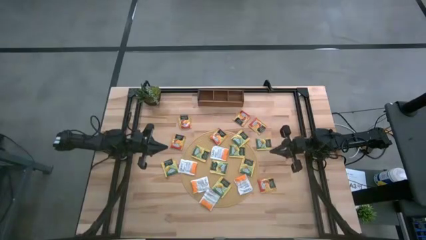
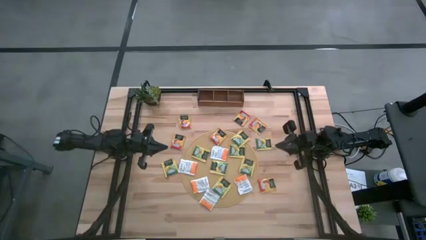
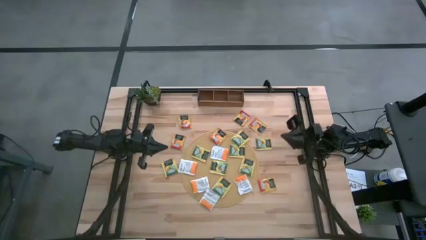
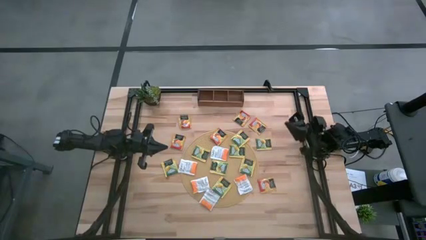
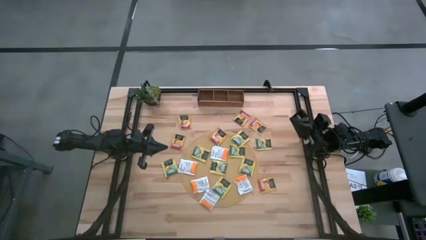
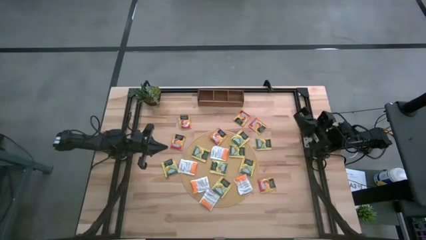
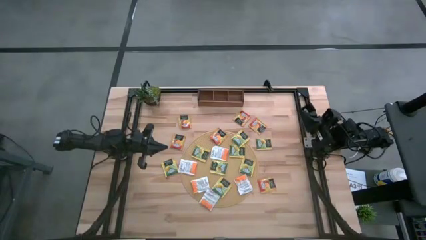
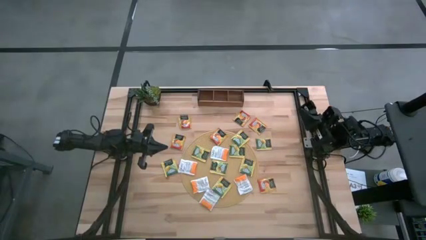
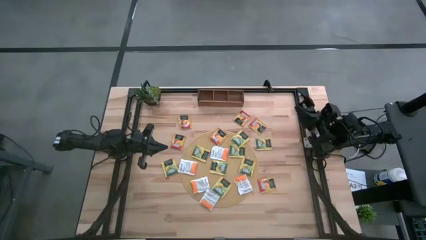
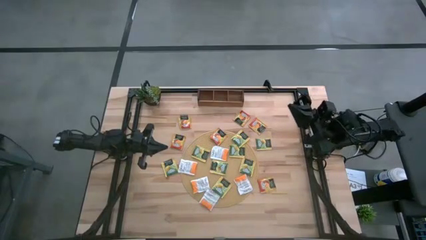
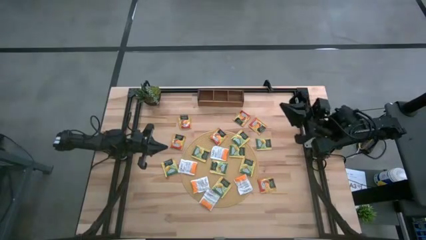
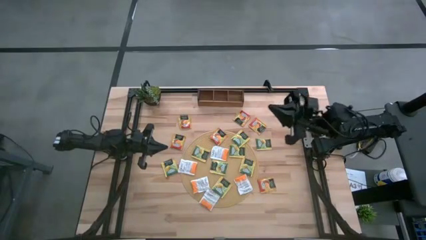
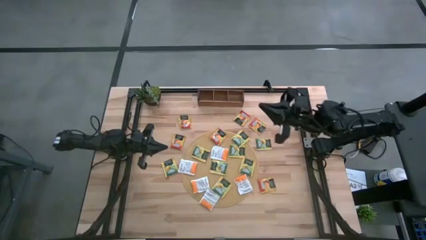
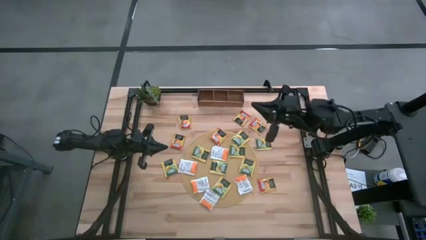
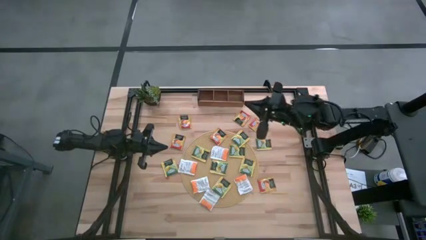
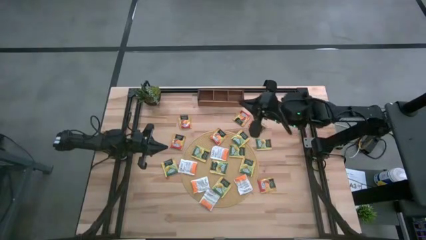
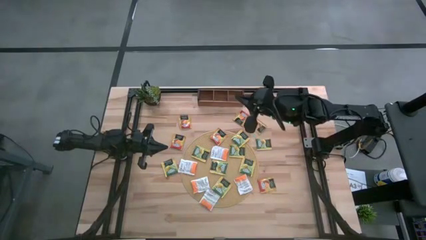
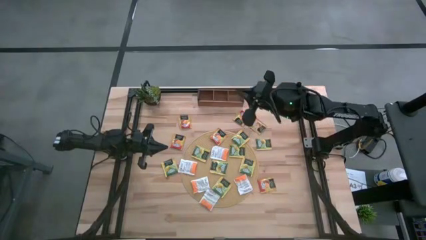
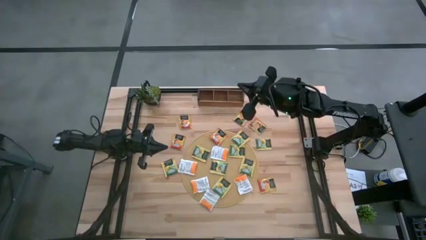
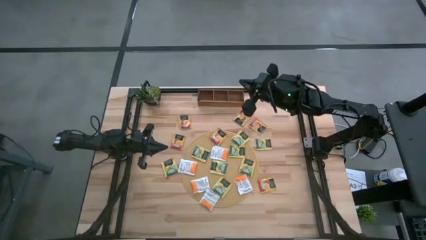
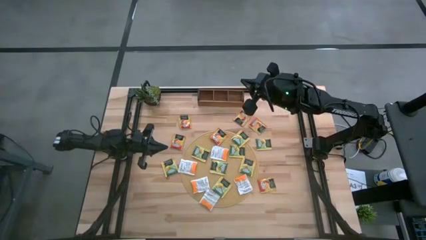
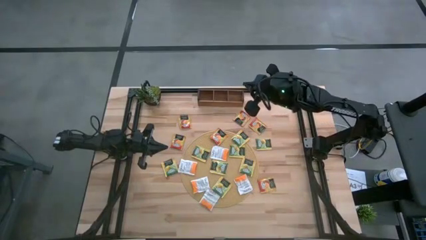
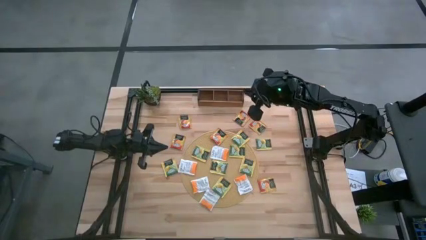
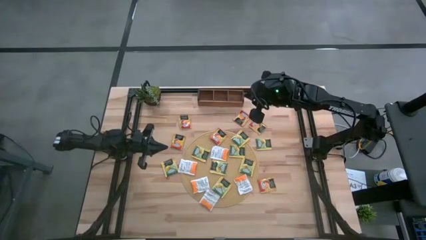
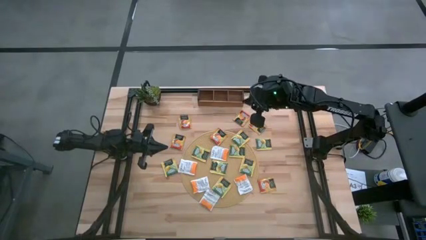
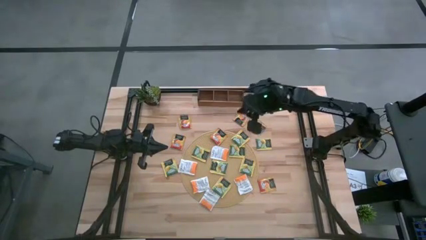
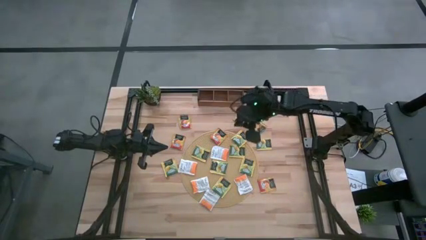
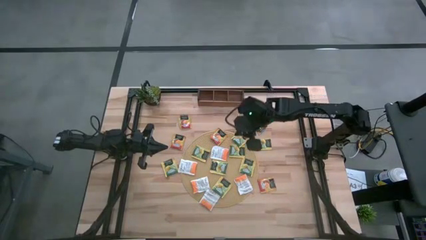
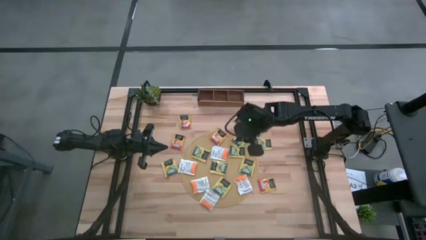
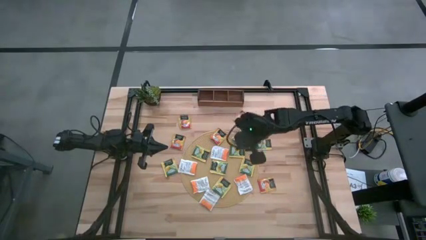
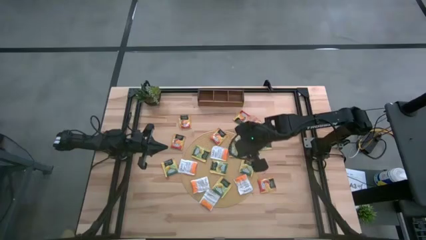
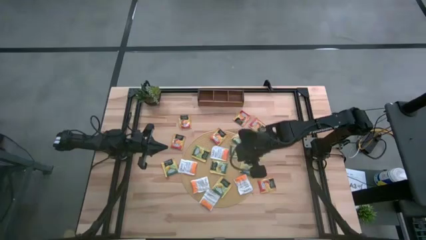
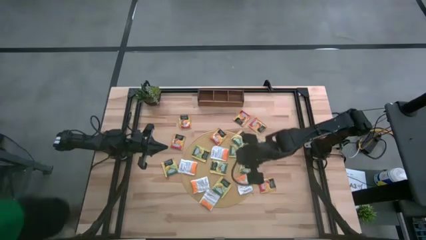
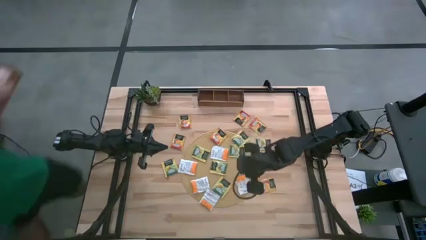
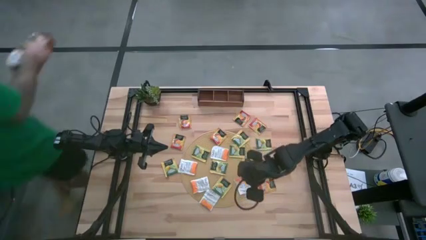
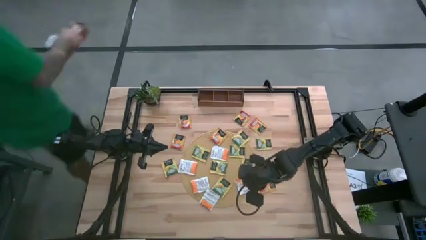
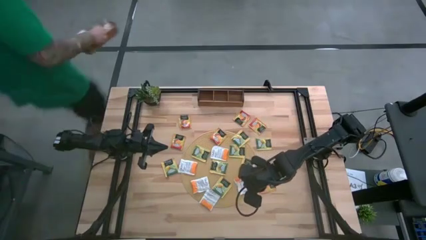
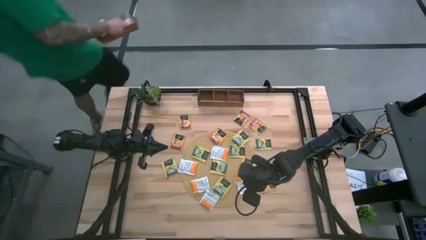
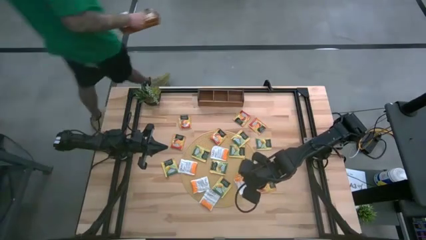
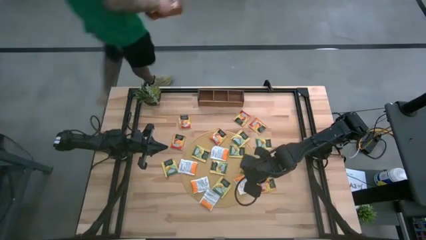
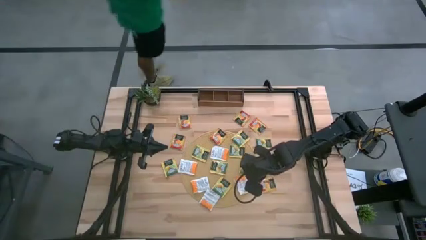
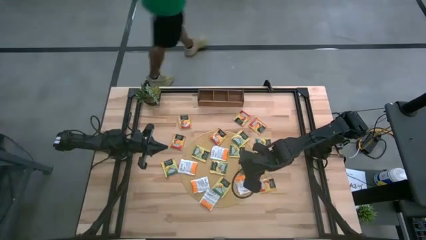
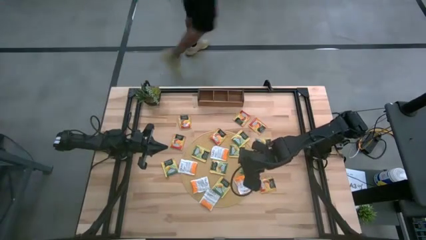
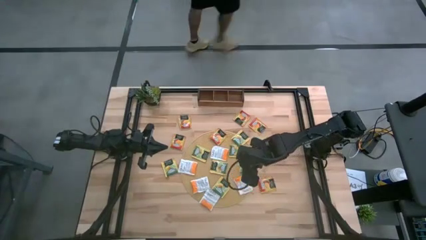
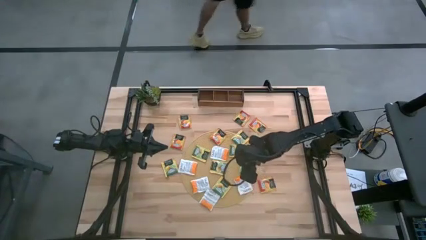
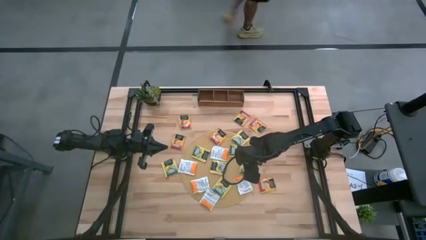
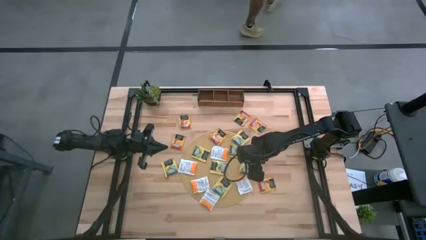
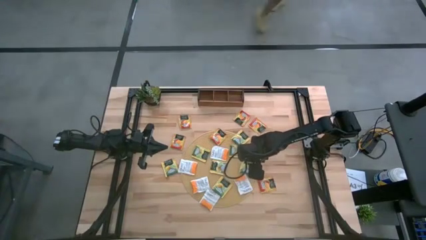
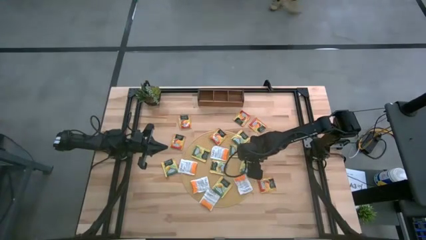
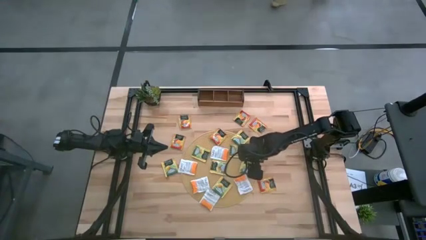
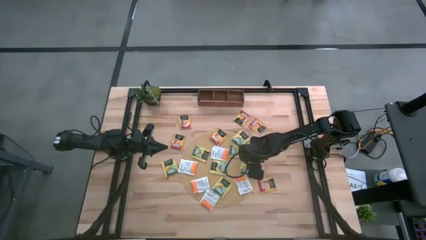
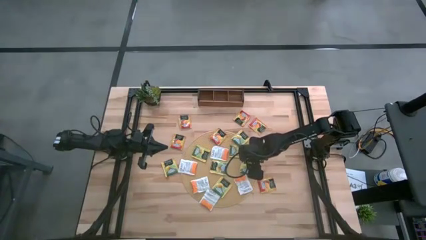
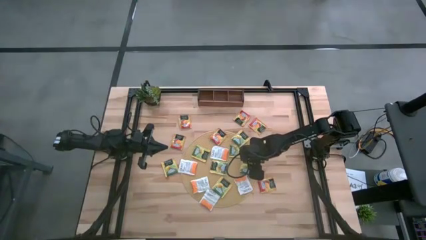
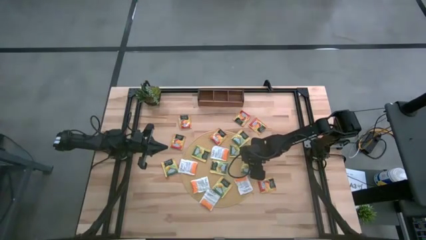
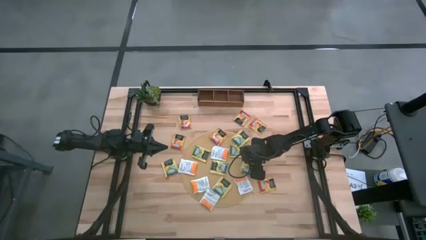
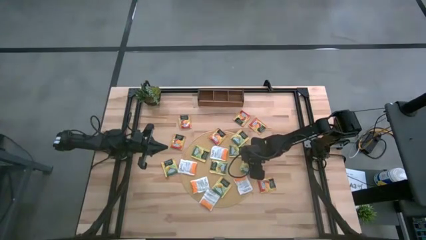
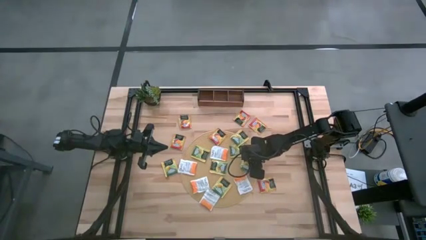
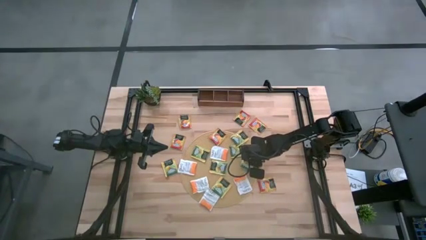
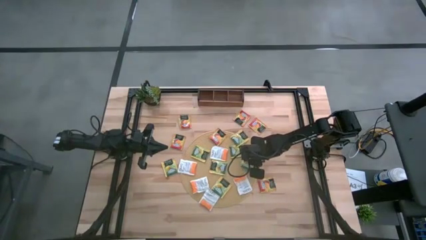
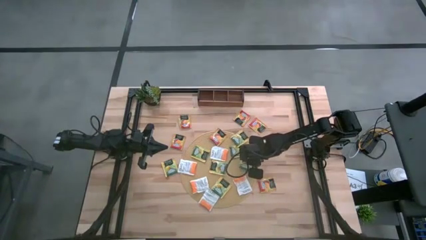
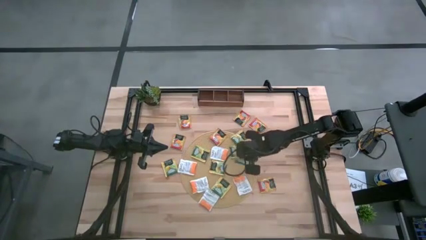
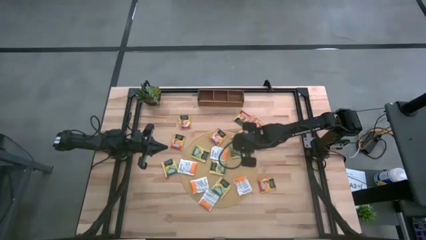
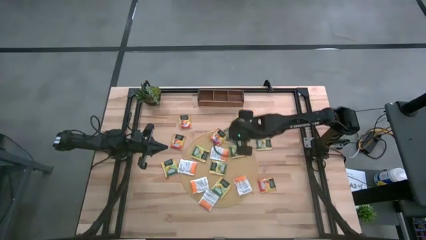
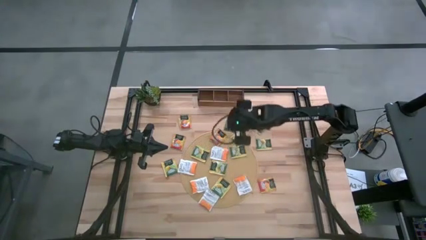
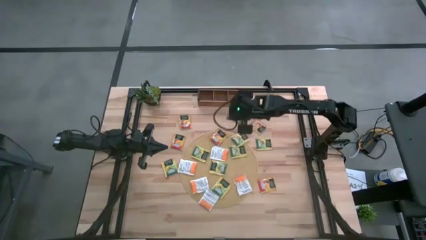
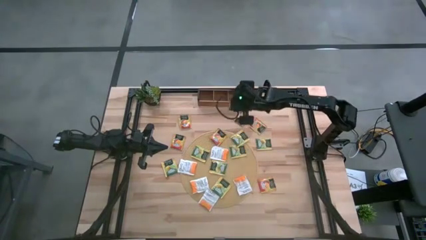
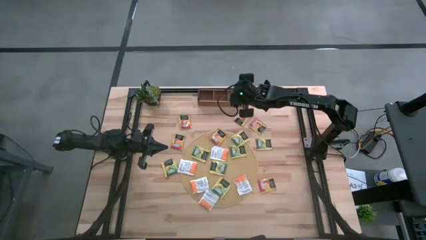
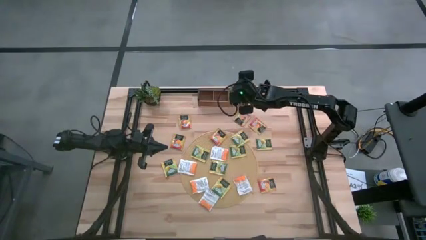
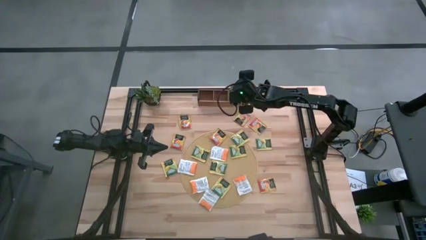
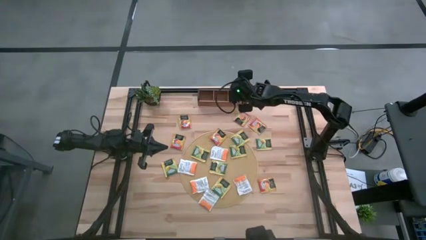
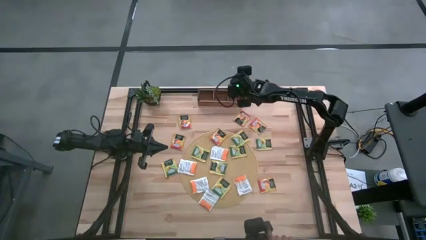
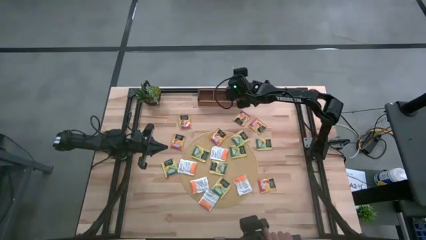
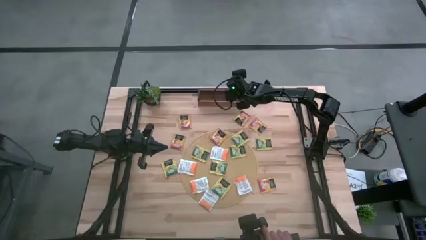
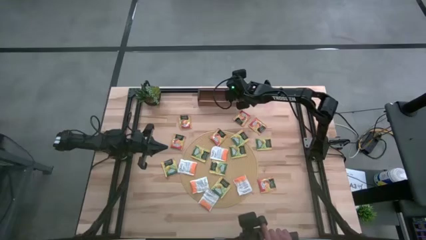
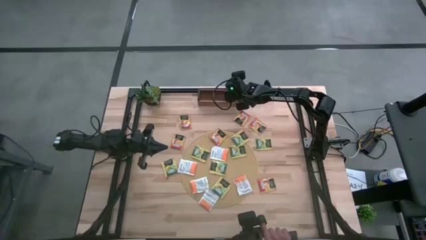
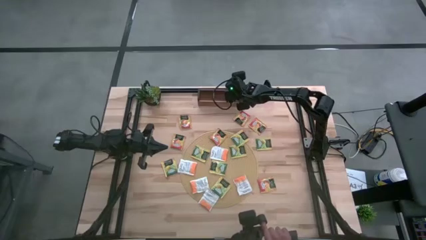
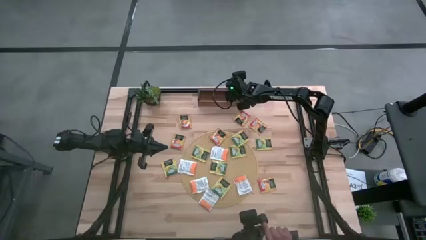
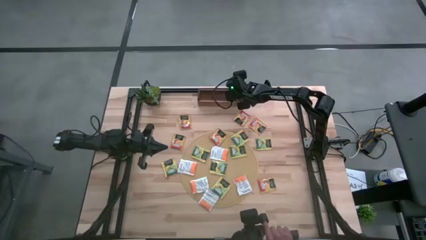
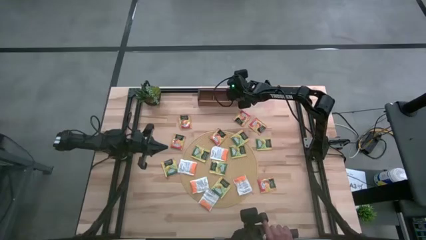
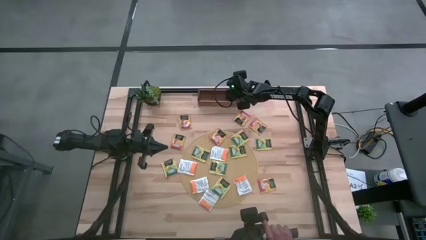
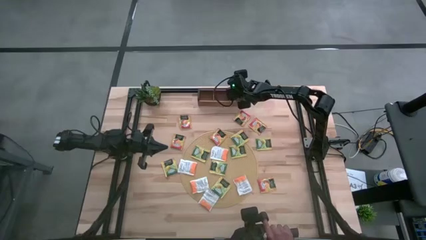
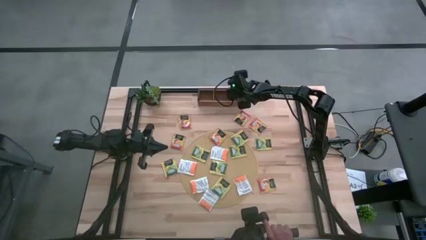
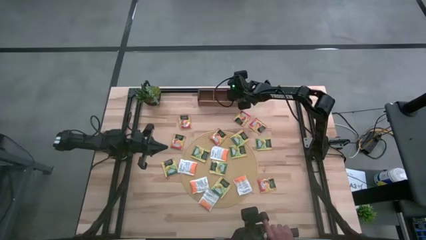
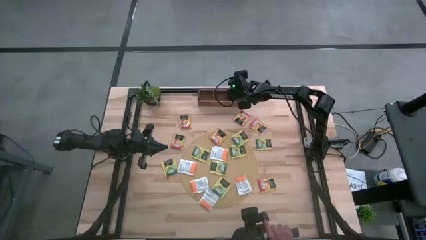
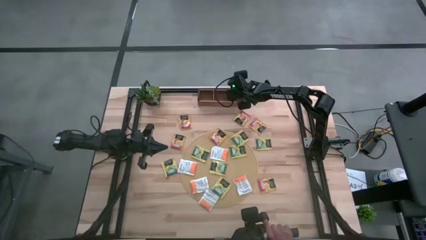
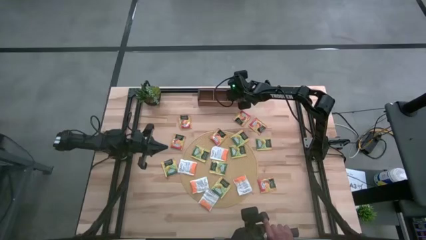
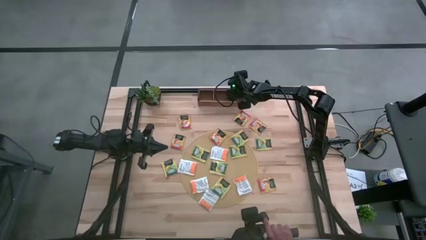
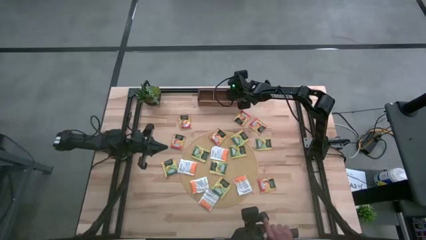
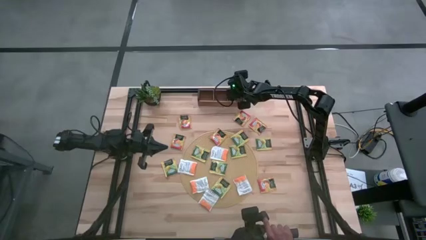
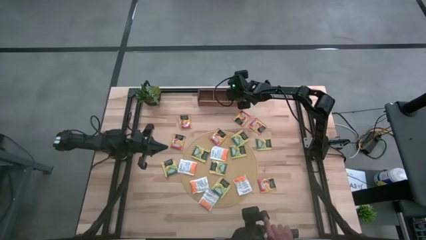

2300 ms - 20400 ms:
Task: Pick & Place Tea
Put the yellow tea bag into the right section of the wooden organizer
